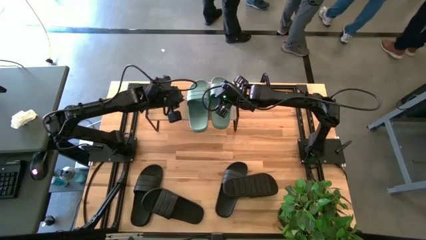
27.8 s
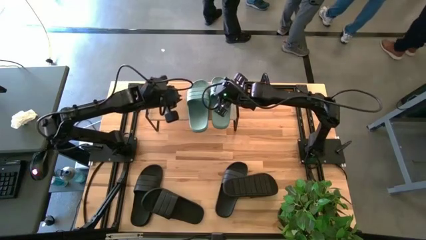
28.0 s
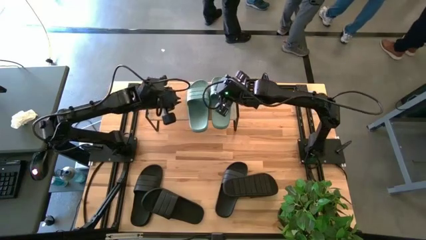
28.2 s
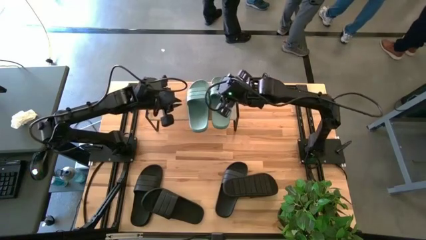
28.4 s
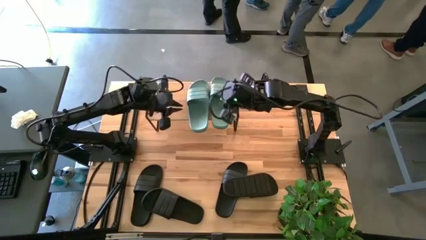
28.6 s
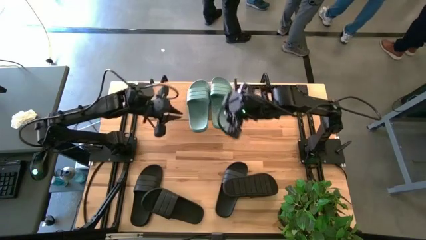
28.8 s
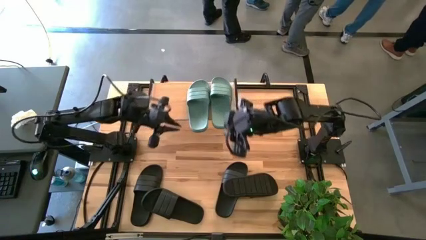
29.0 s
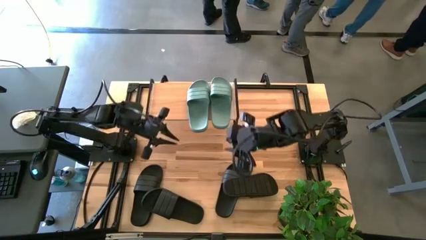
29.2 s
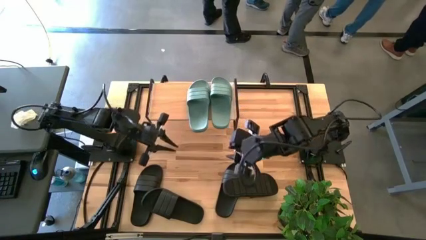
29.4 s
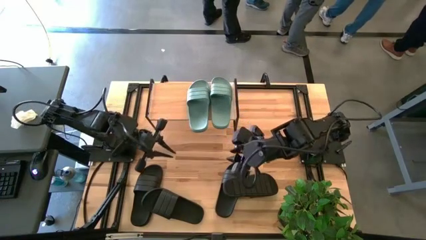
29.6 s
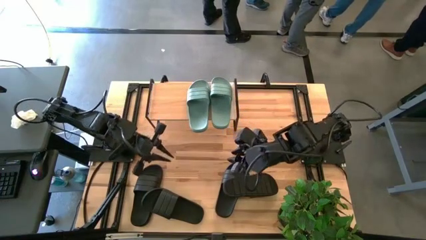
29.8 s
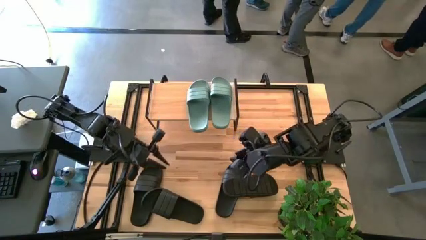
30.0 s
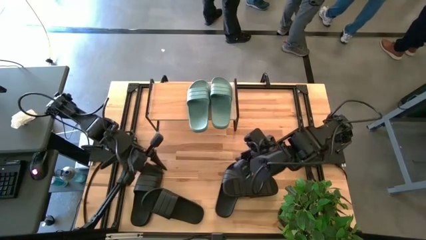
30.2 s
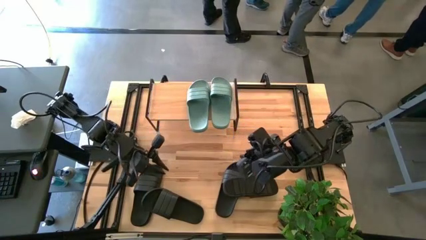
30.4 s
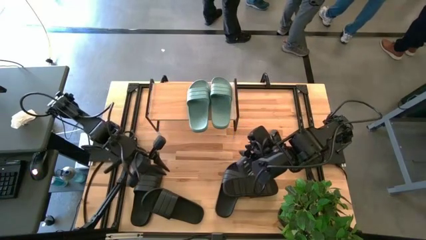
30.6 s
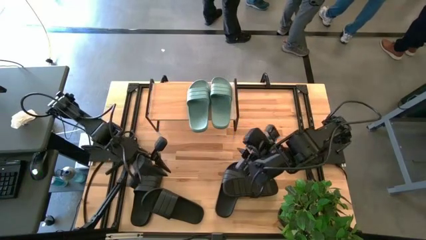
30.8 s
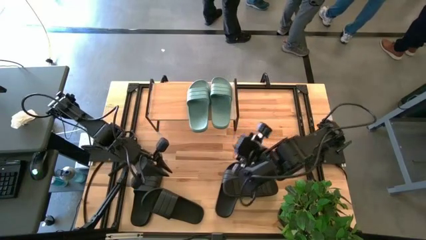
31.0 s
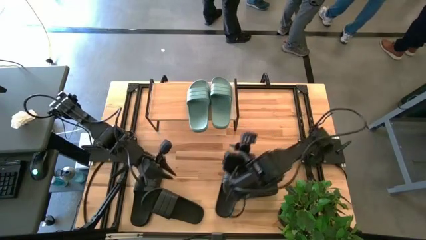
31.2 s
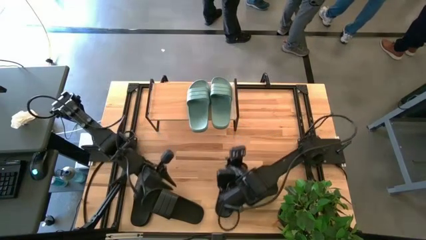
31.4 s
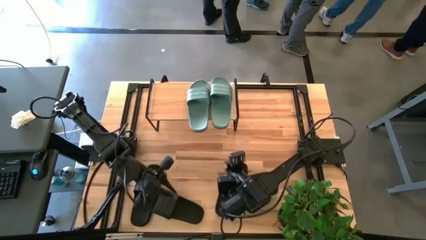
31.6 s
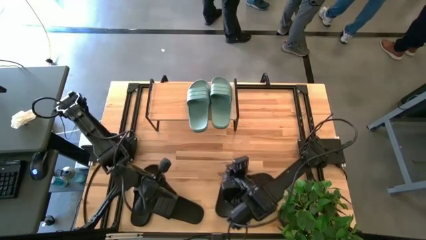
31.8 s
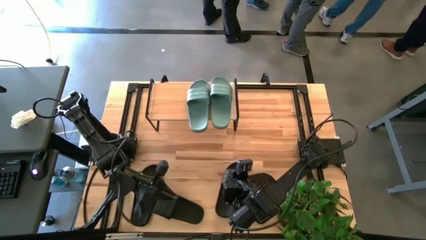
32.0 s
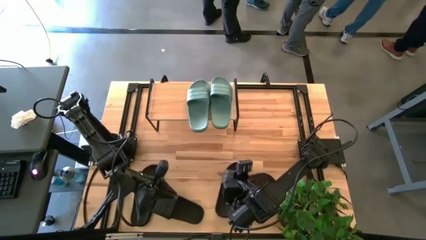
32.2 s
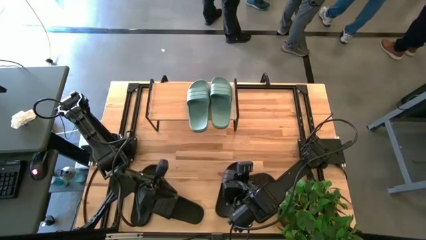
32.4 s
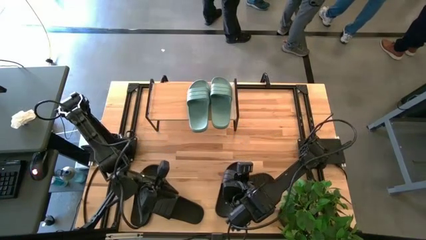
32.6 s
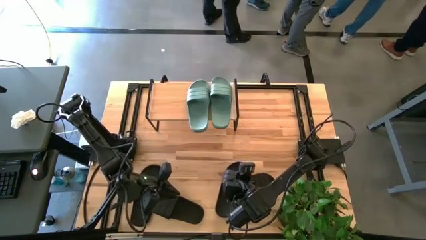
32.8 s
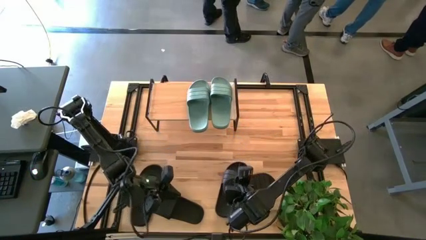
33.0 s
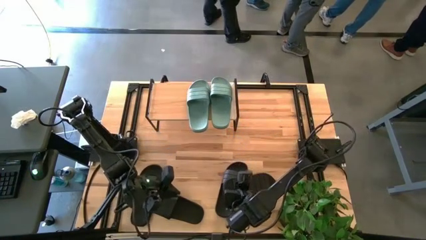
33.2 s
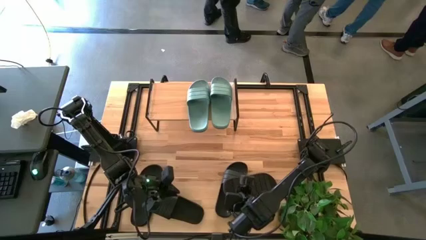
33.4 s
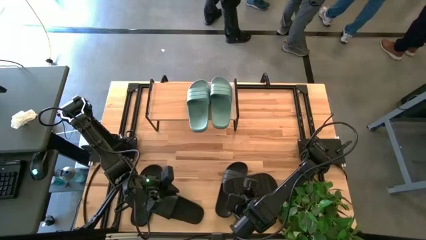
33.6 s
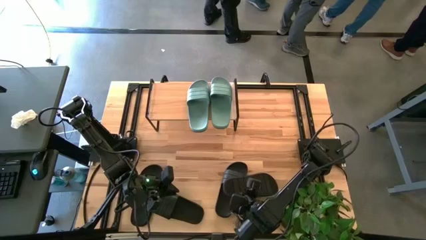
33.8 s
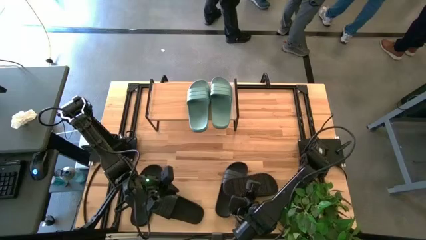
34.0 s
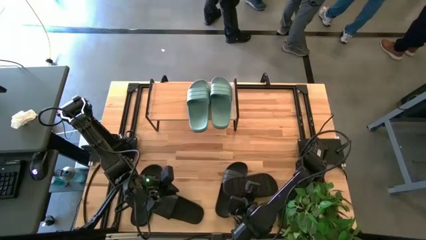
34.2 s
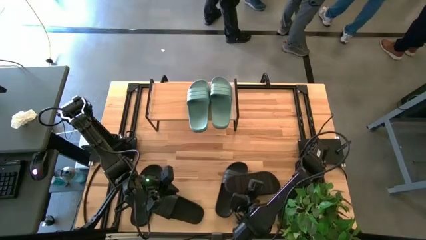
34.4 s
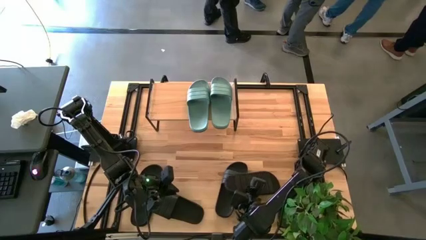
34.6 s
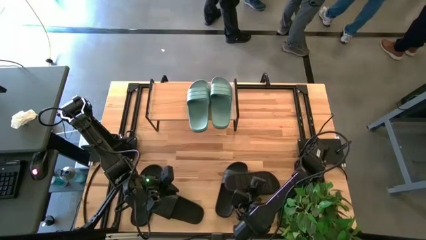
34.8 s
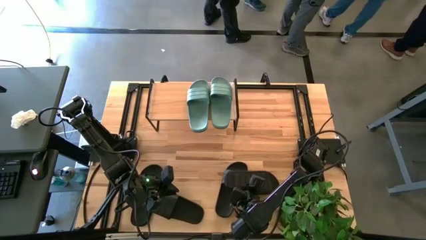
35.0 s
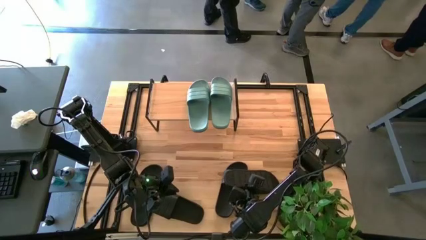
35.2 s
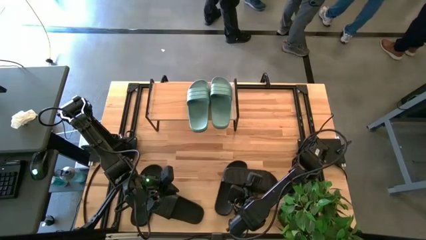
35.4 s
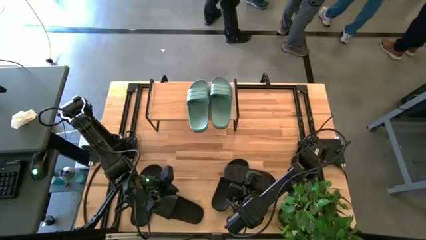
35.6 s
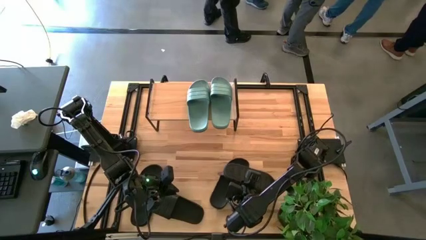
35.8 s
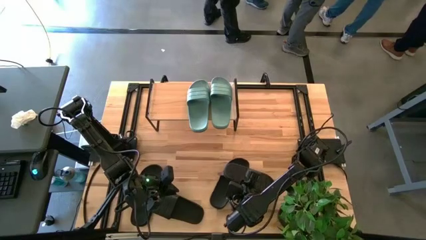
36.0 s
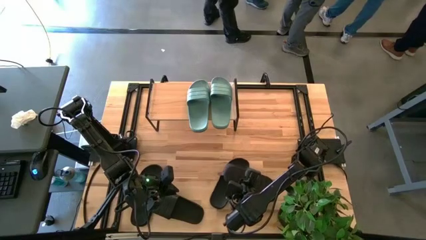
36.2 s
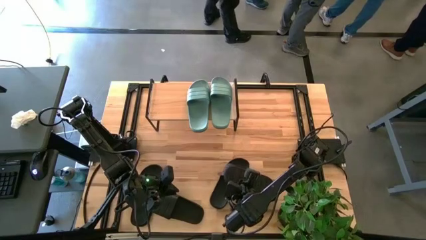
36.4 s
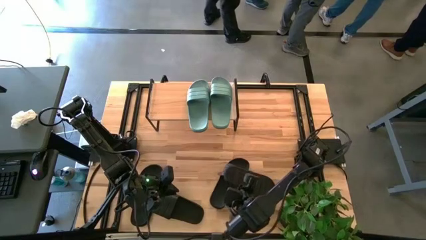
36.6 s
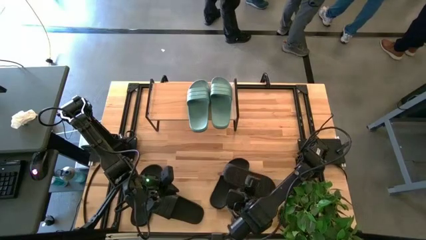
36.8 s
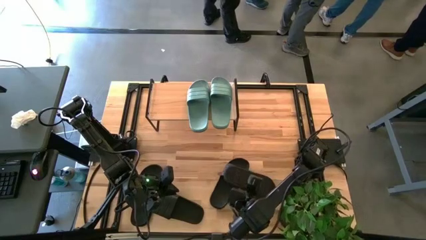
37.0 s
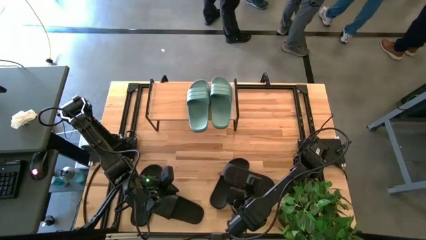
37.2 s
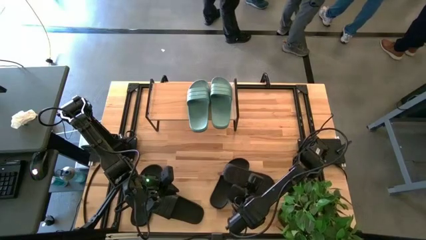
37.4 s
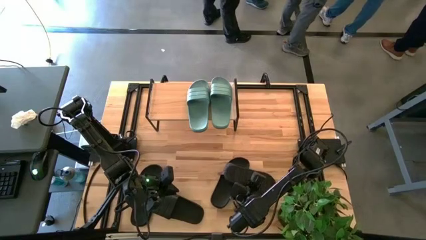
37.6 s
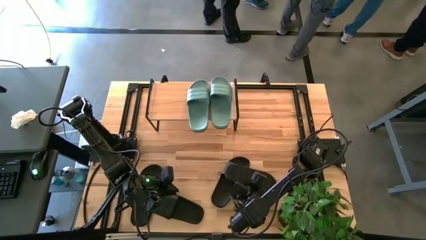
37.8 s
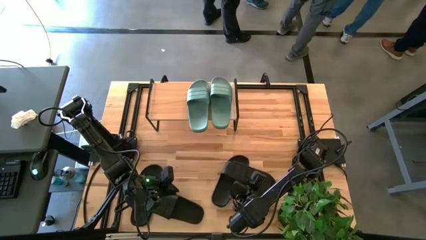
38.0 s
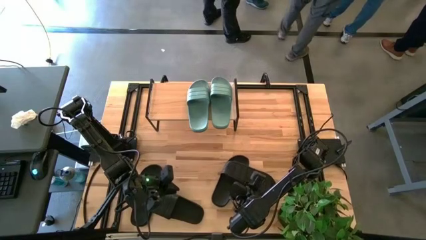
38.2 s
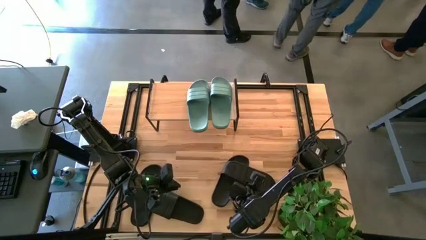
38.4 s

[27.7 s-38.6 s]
Task: Pick and place slides into the shelf
Put the black slide under the shelf

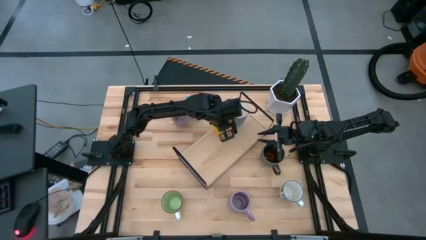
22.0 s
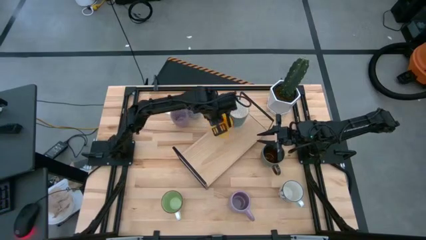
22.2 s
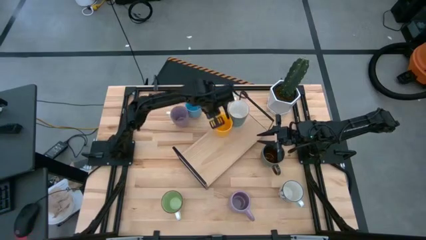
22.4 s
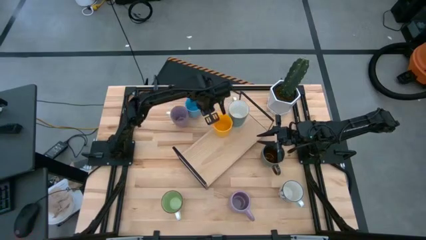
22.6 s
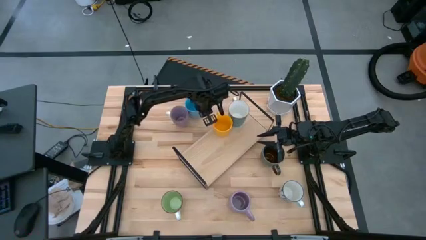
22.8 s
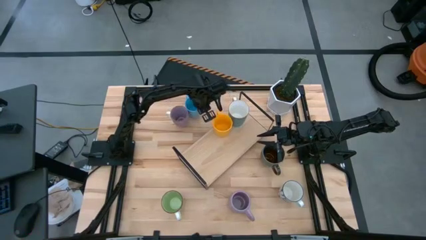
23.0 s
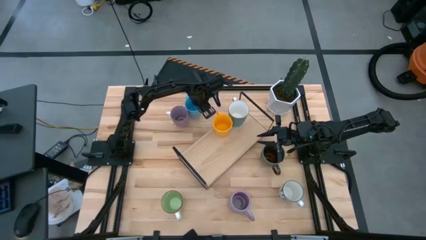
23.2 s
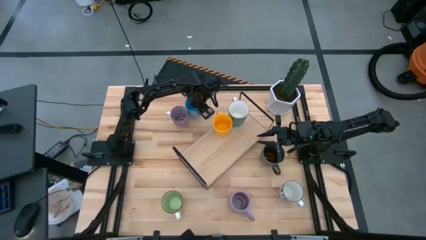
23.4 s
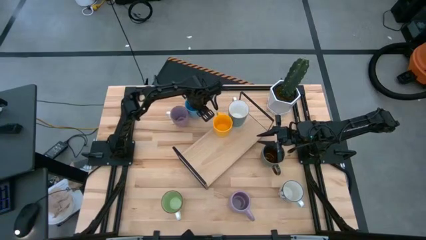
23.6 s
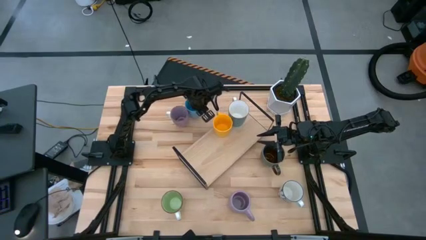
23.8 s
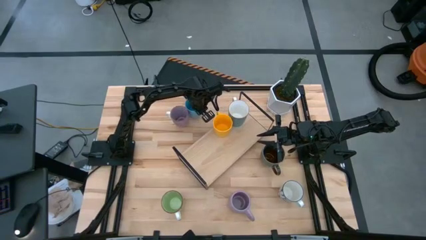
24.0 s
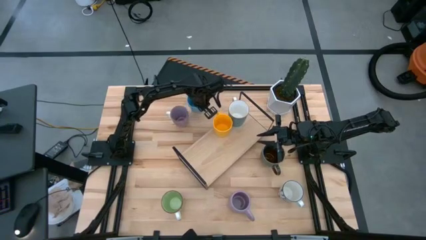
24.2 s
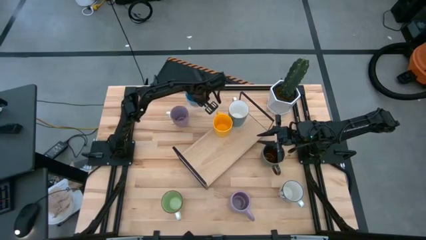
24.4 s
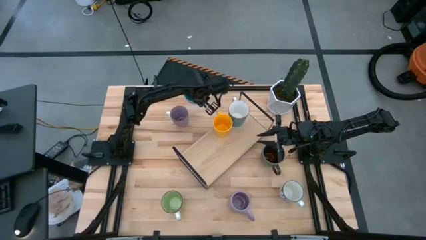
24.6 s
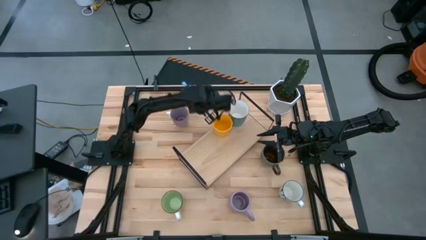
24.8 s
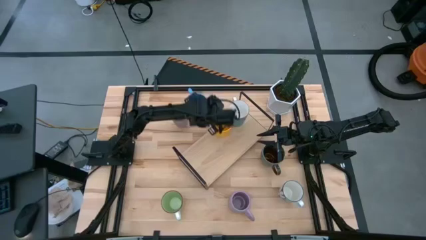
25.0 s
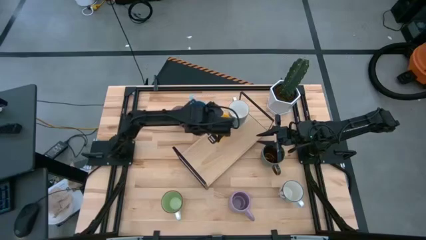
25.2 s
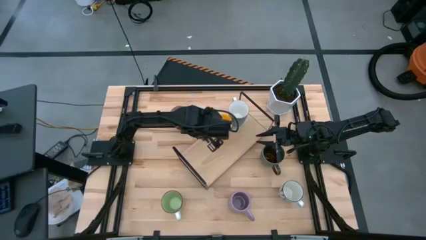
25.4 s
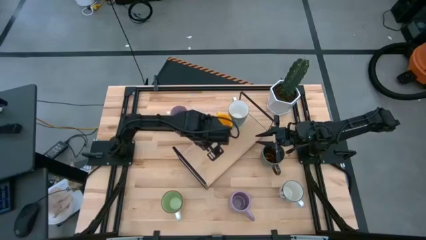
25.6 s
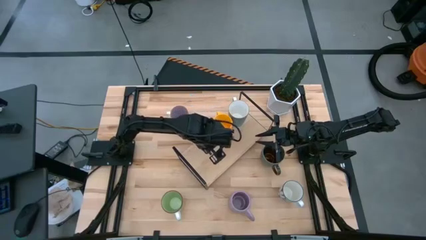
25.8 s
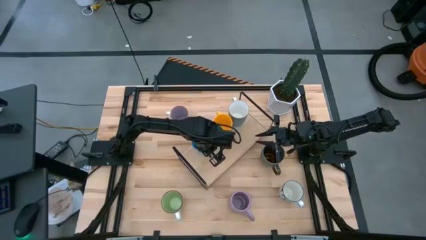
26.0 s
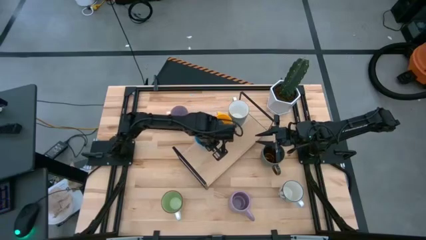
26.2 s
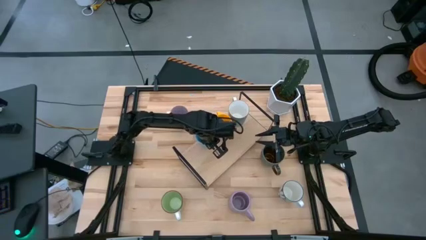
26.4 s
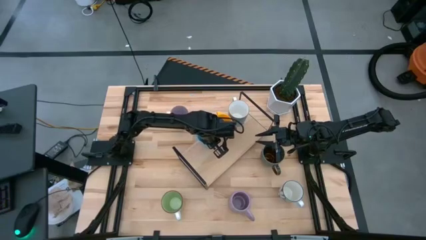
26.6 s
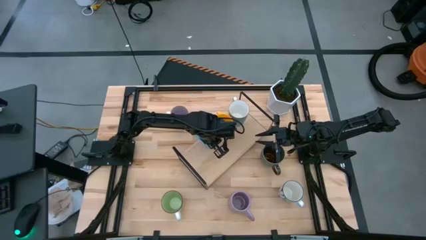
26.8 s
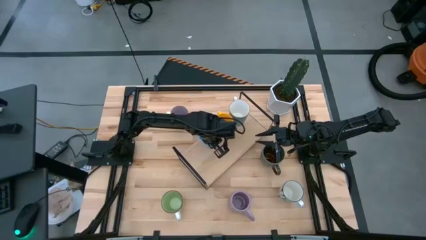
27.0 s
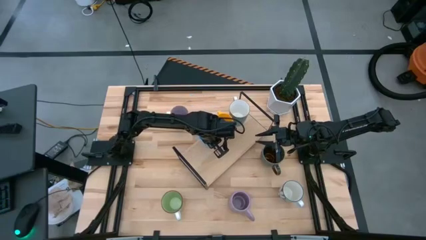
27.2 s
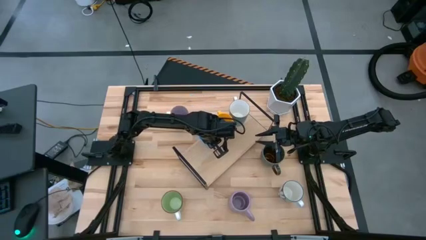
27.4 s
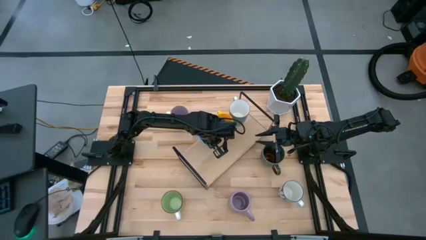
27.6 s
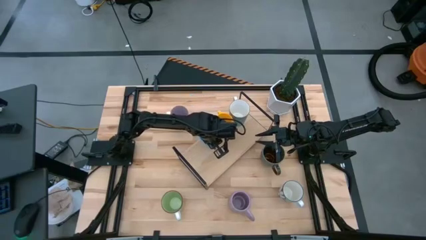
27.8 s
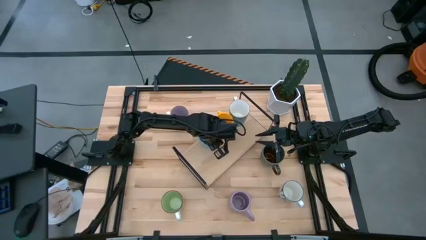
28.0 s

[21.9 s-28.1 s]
Task: Place coffee mugs
Put the light blue mug on the shelf
